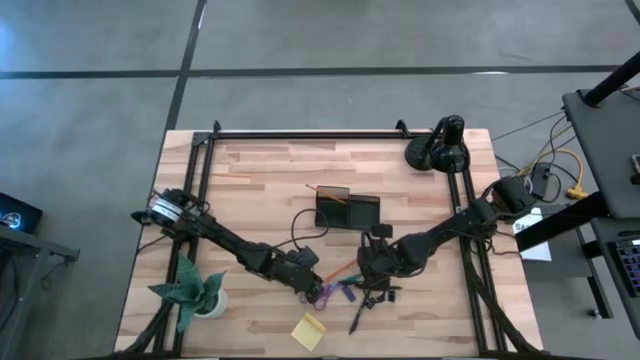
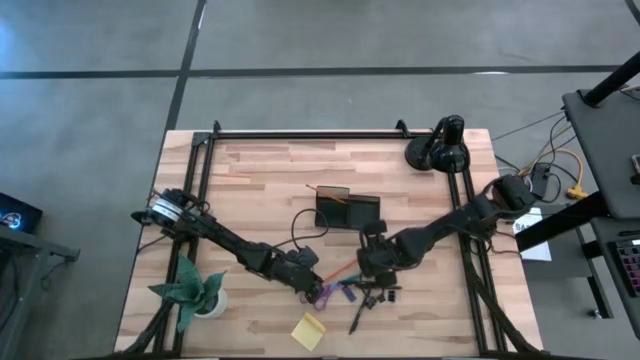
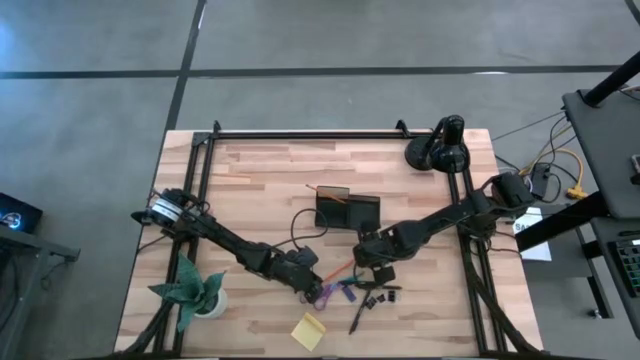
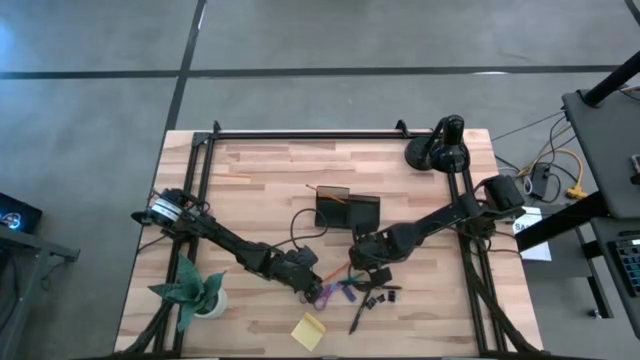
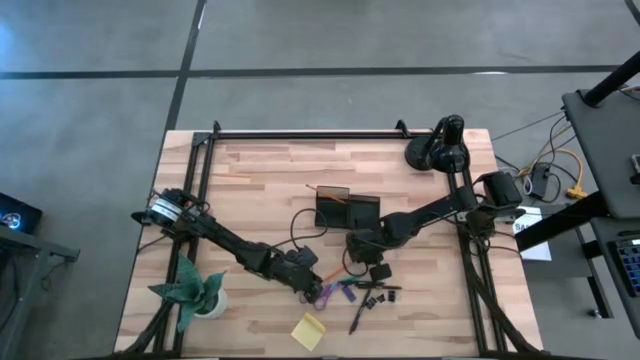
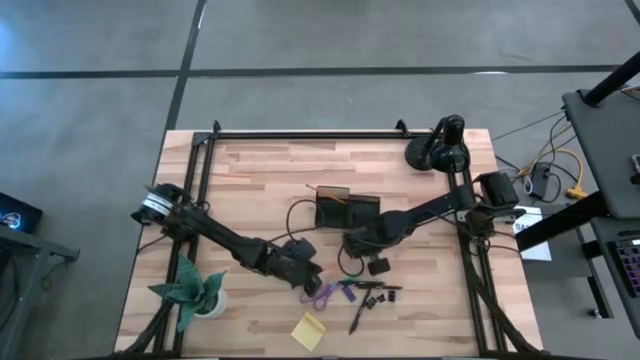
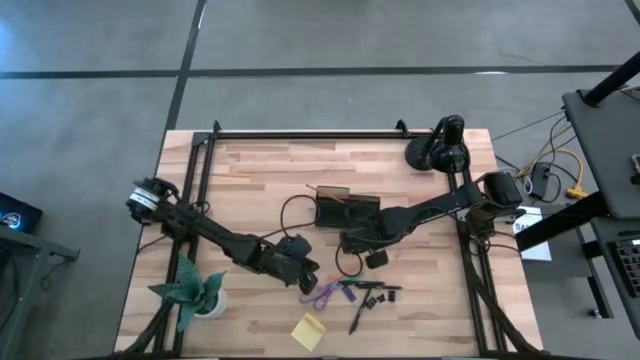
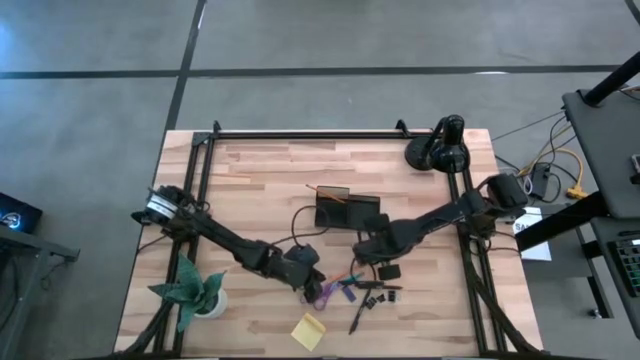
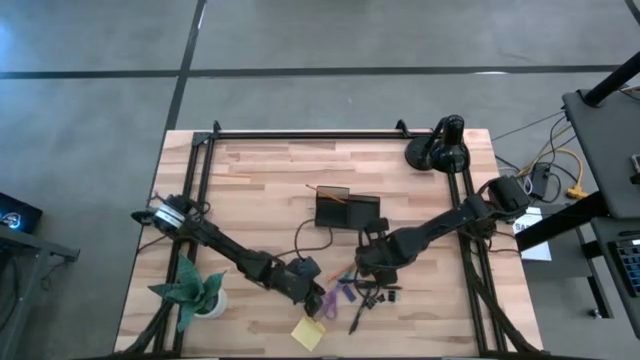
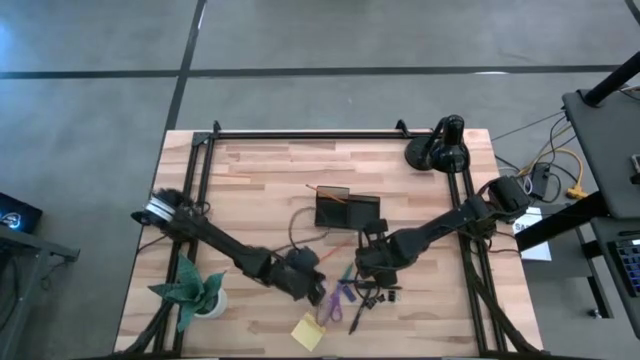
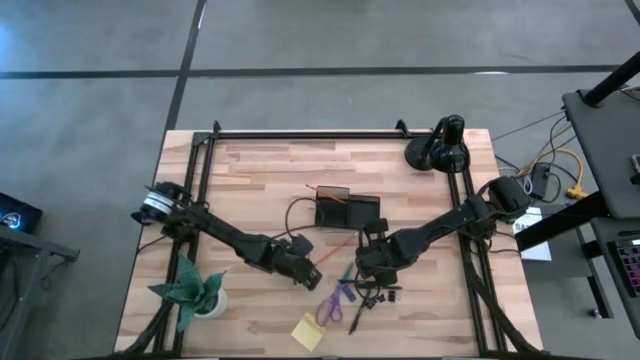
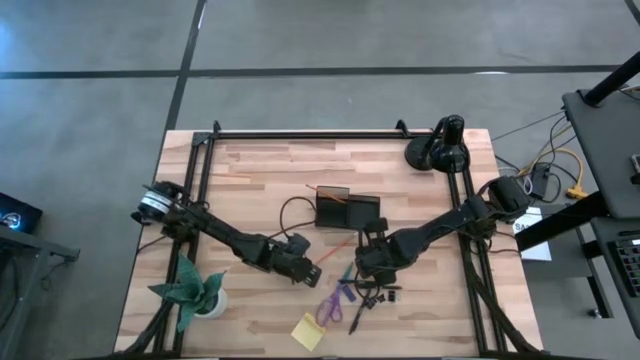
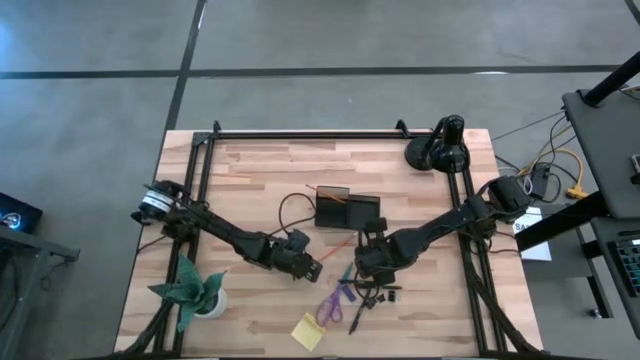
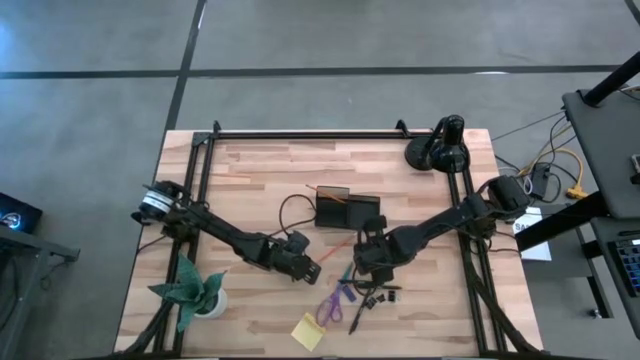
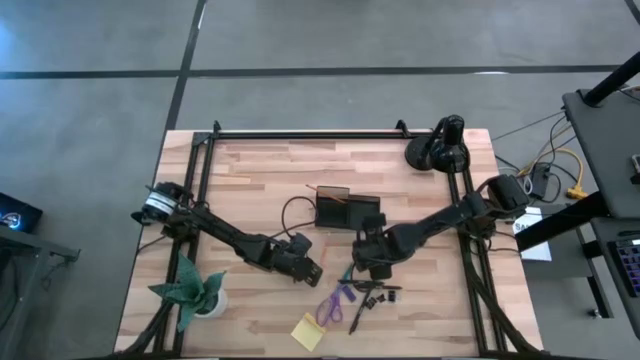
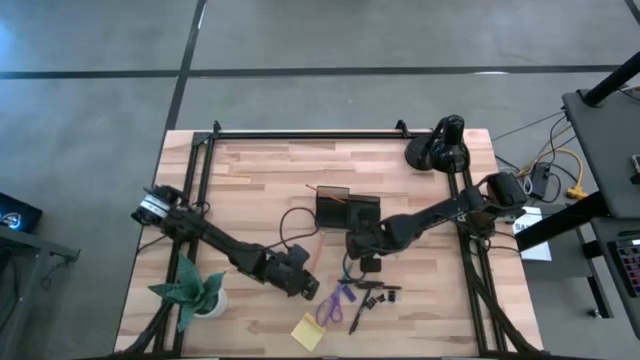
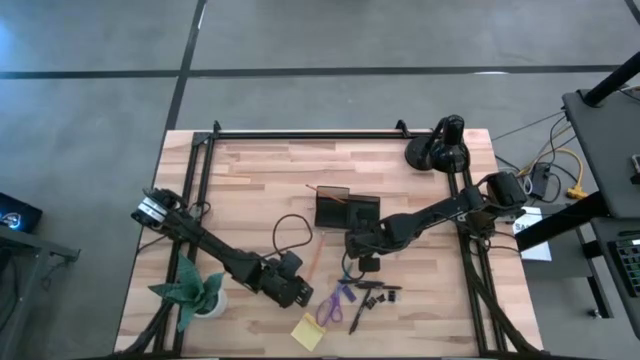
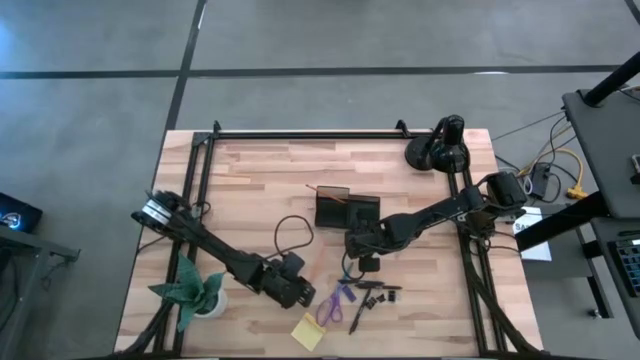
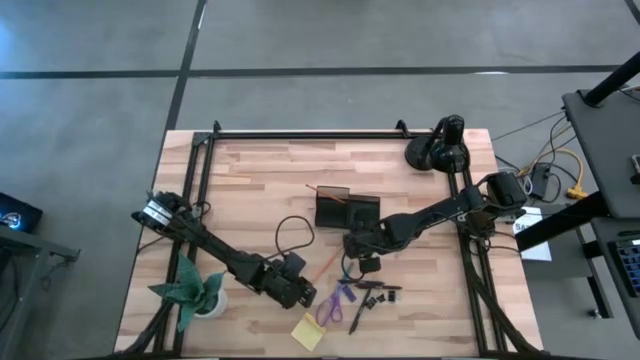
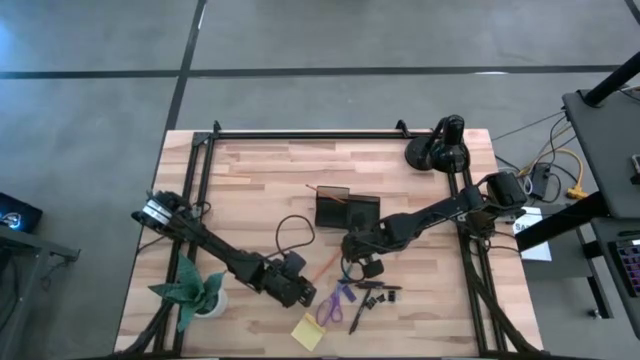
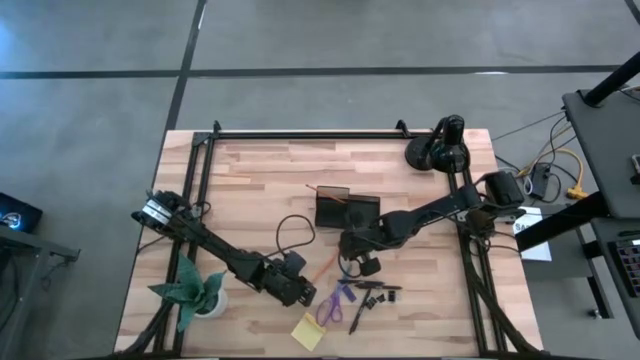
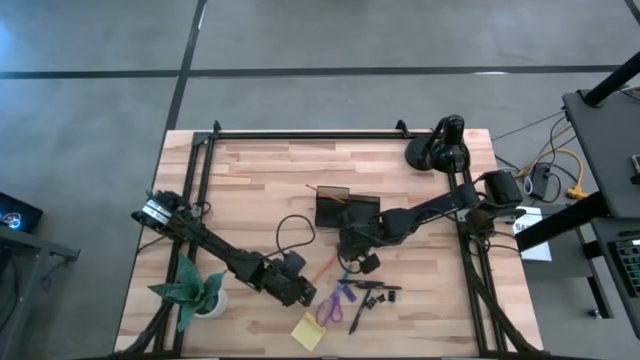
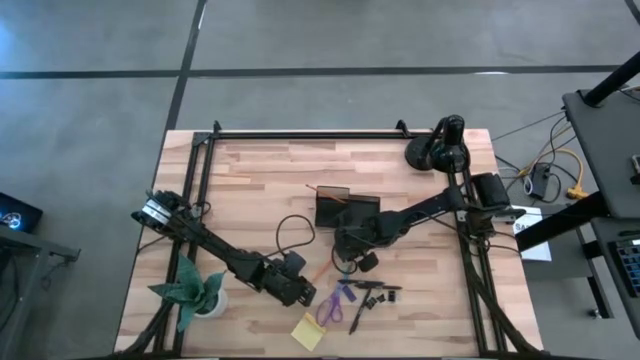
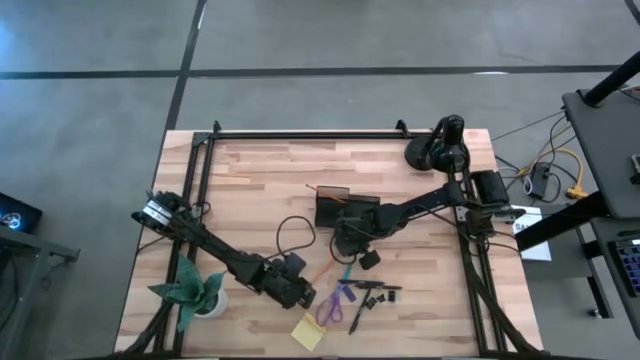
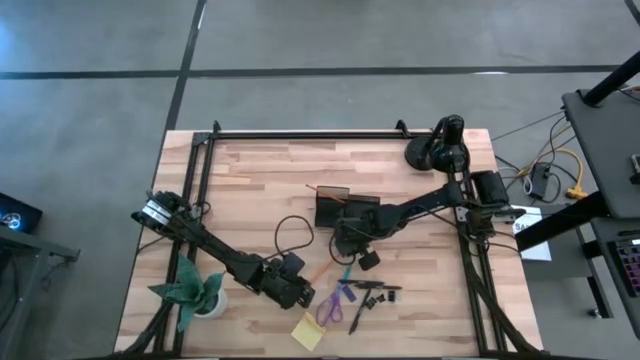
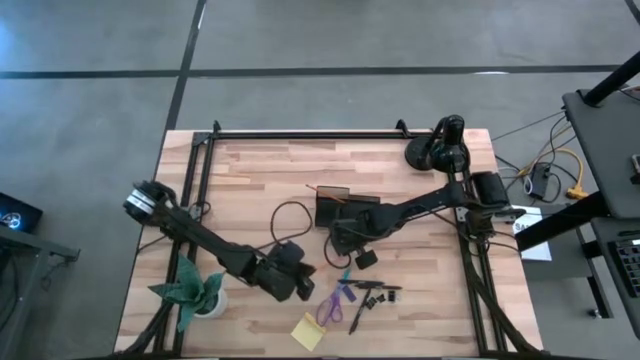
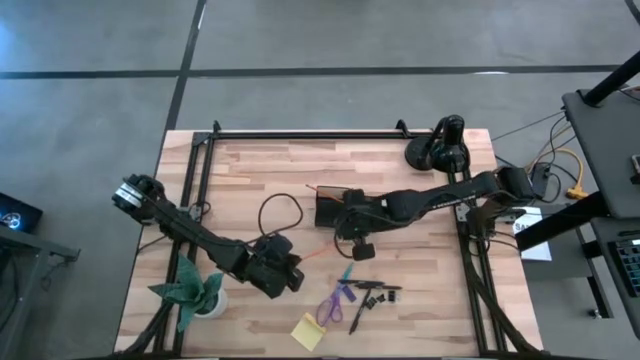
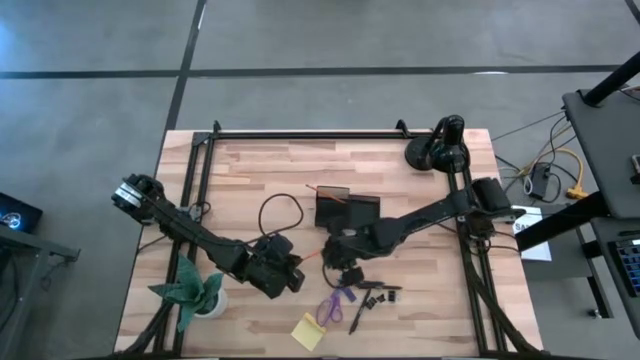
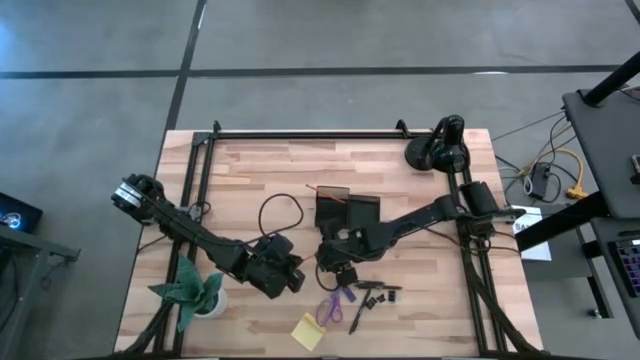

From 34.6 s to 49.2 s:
Task: Pick and place office supplies into organizer
Put the yellow pencil into the black desk organizer

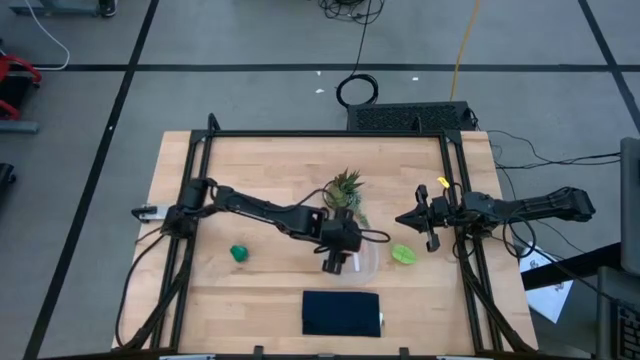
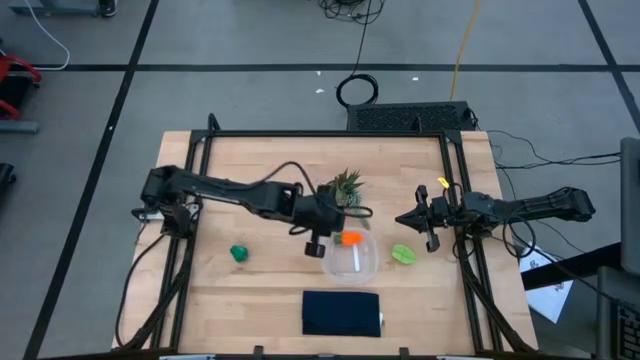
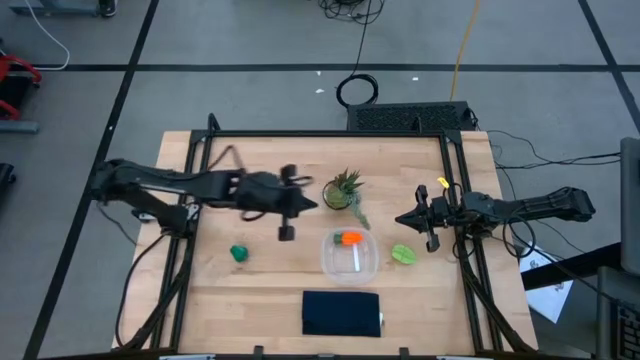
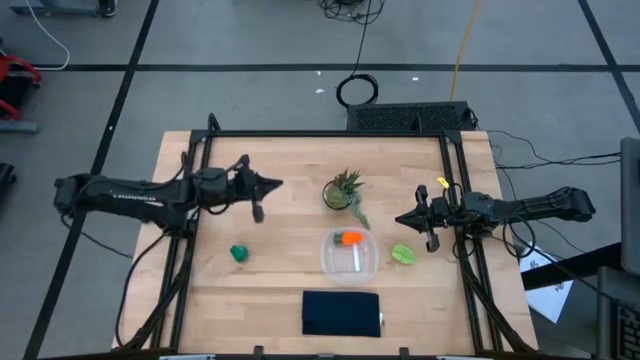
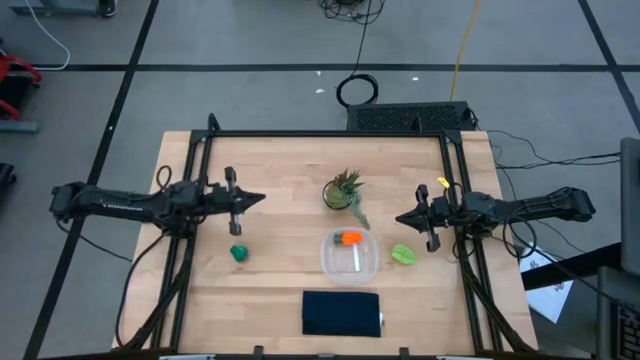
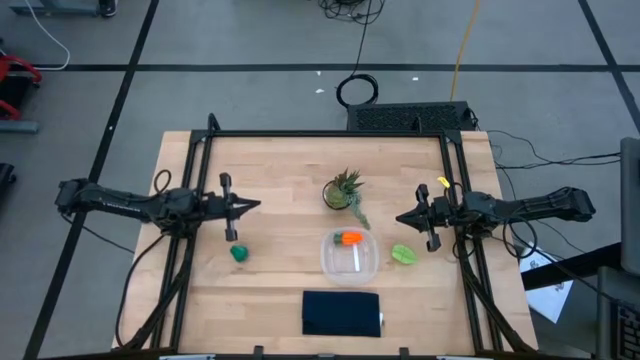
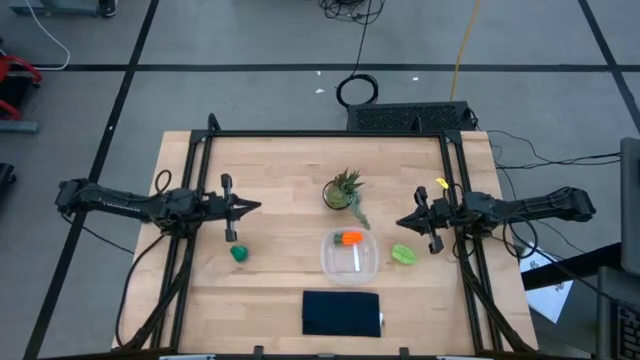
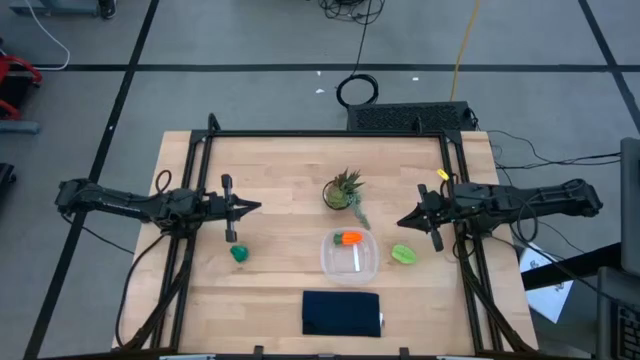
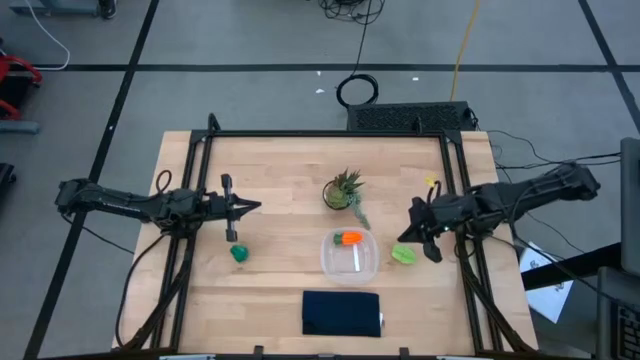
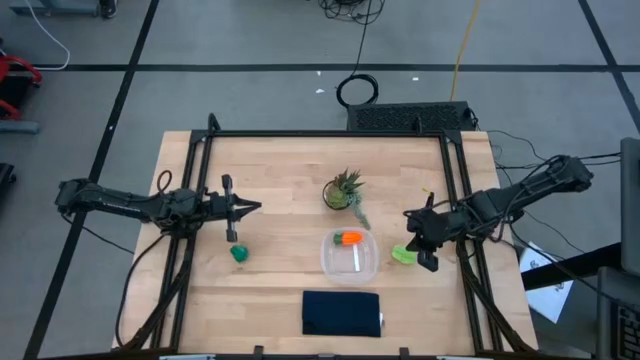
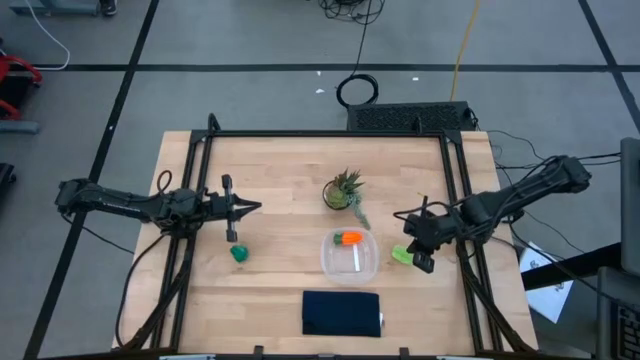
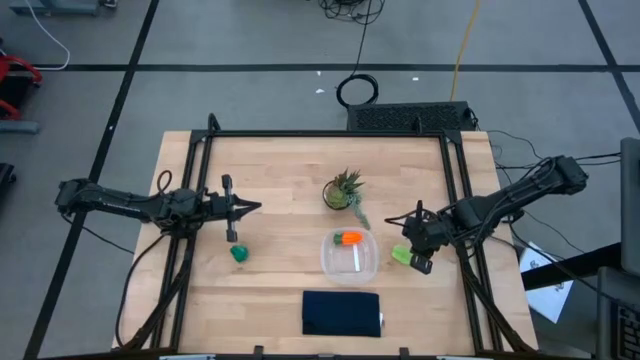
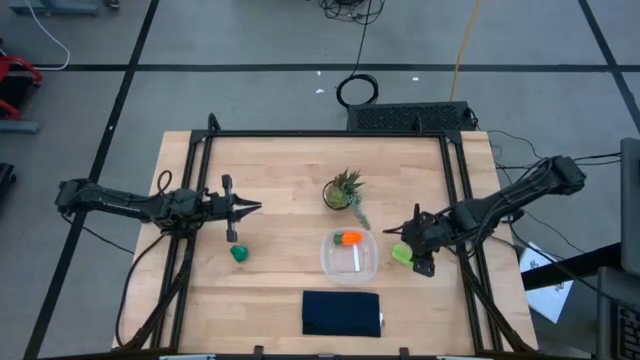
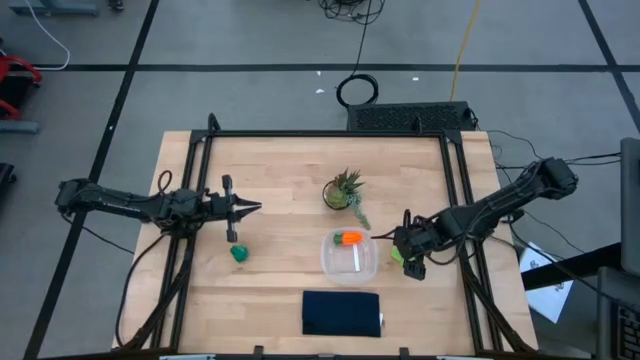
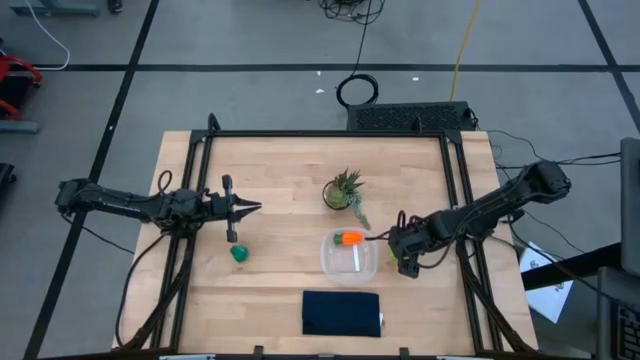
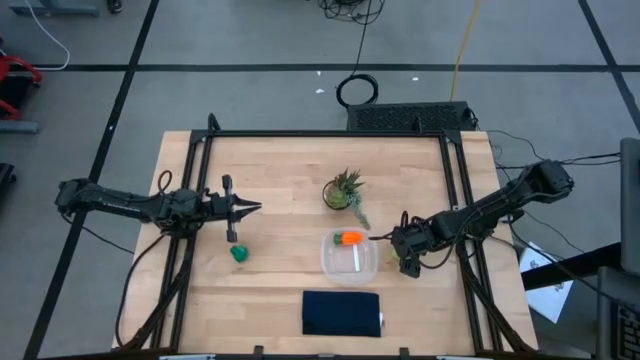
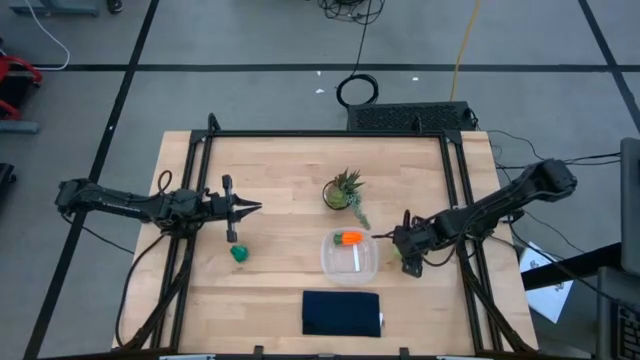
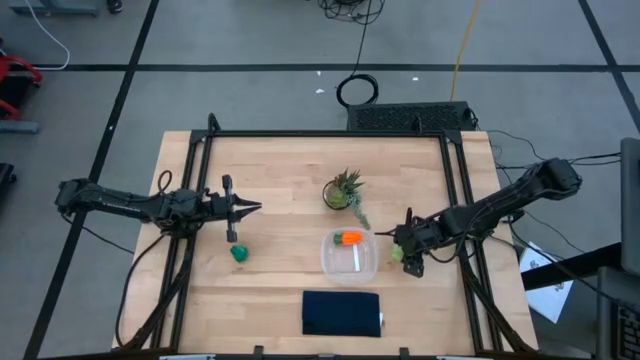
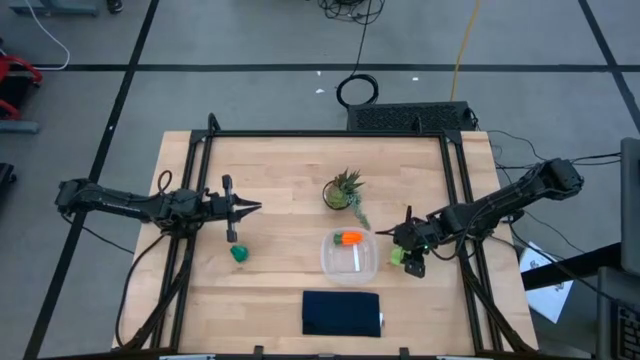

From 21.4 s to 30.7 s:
Task: Pick and placing Produce into tupperware
Put the green starfruit into the transparent bin
